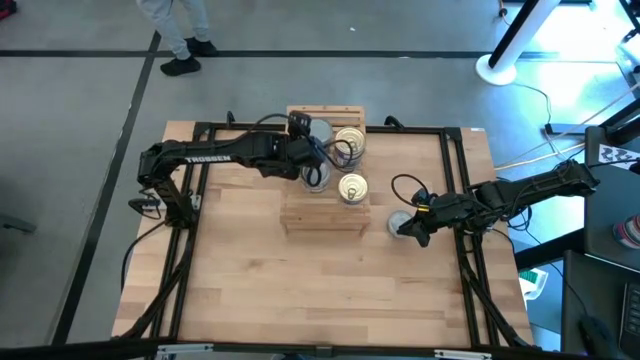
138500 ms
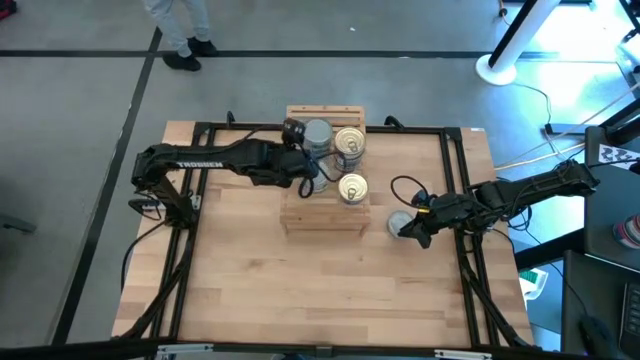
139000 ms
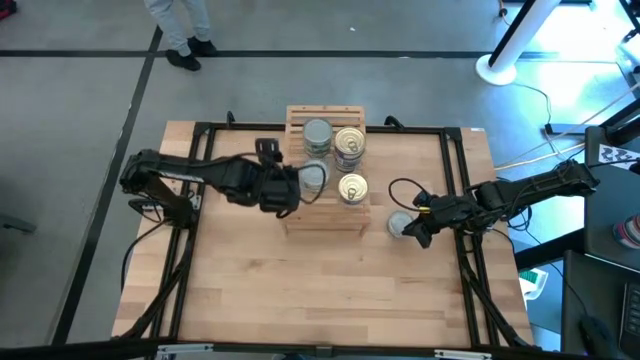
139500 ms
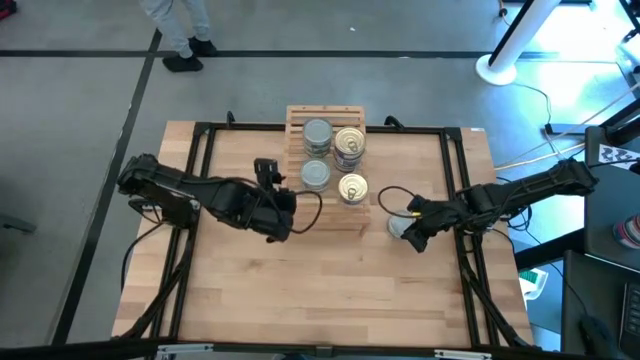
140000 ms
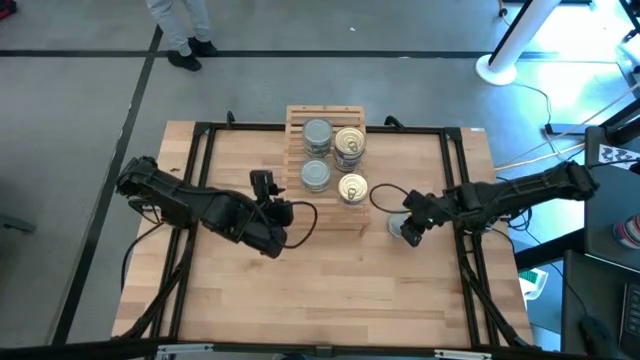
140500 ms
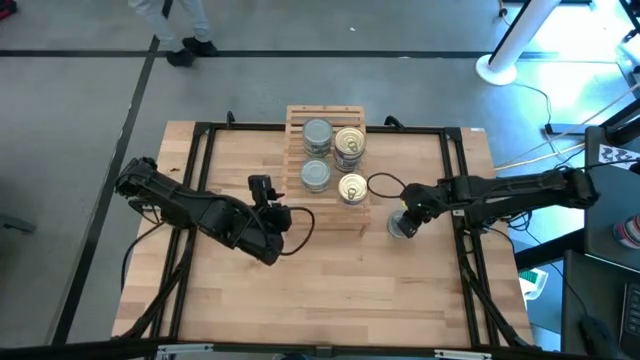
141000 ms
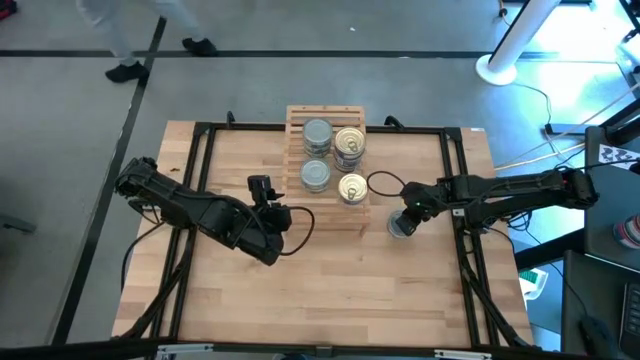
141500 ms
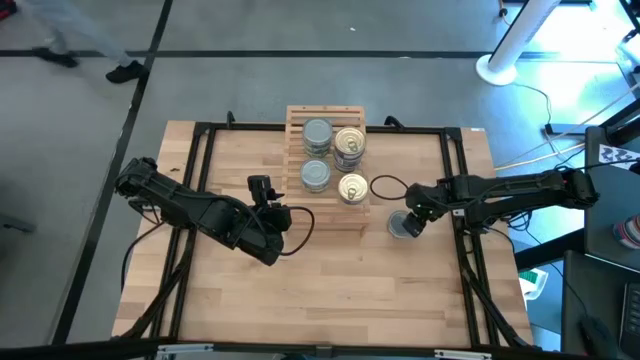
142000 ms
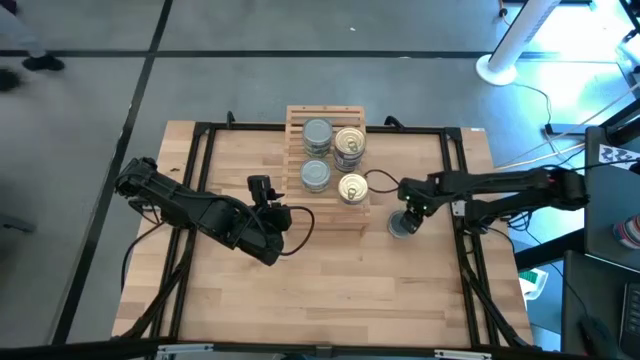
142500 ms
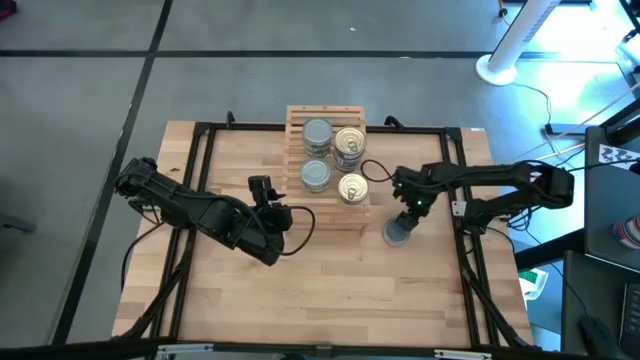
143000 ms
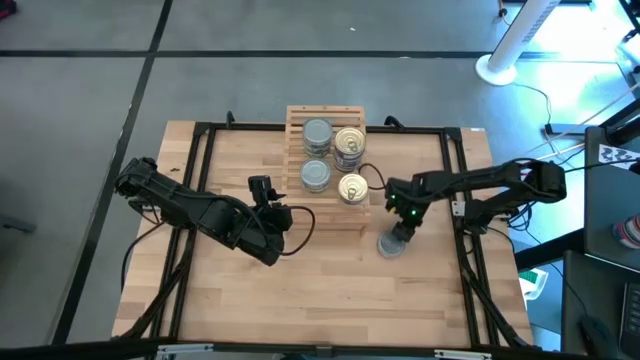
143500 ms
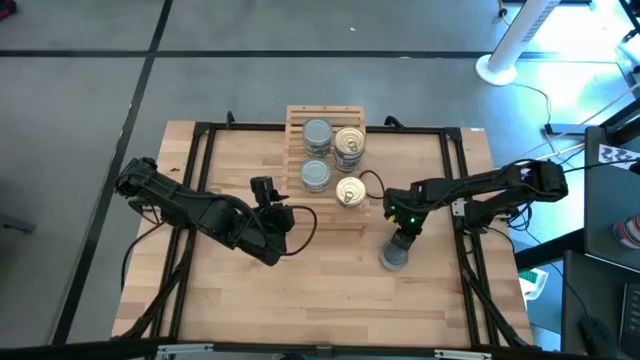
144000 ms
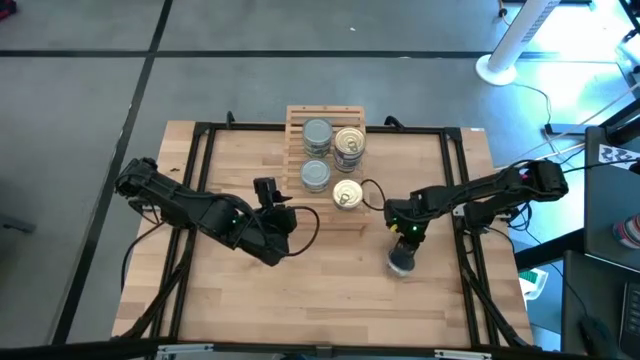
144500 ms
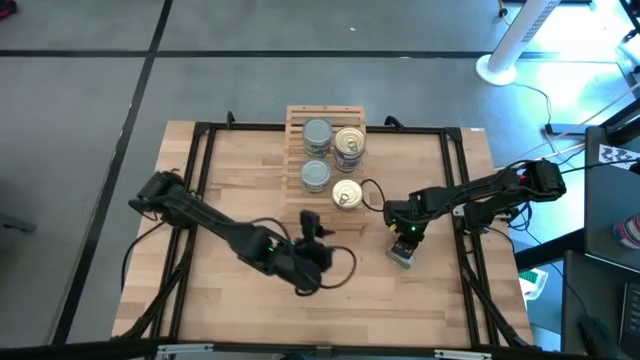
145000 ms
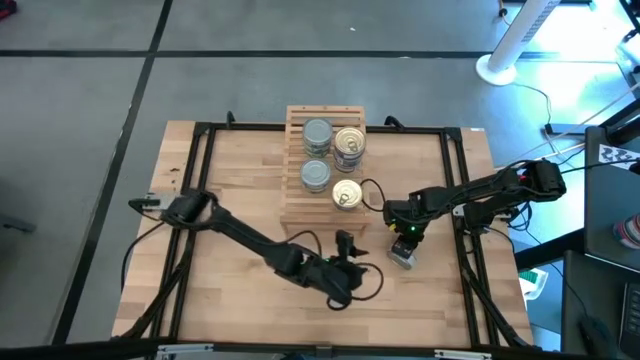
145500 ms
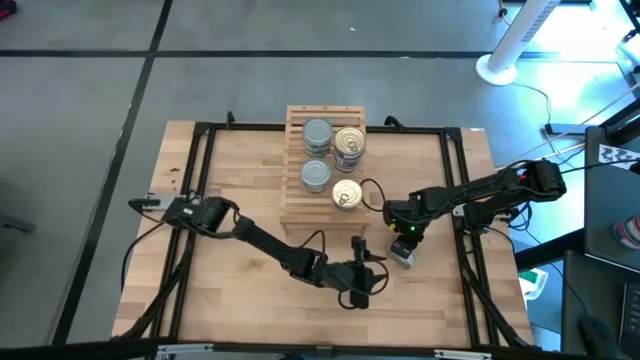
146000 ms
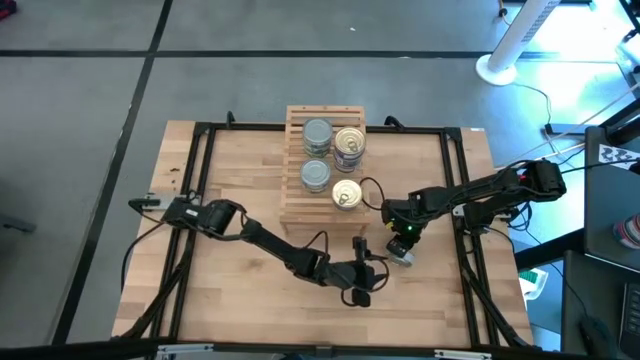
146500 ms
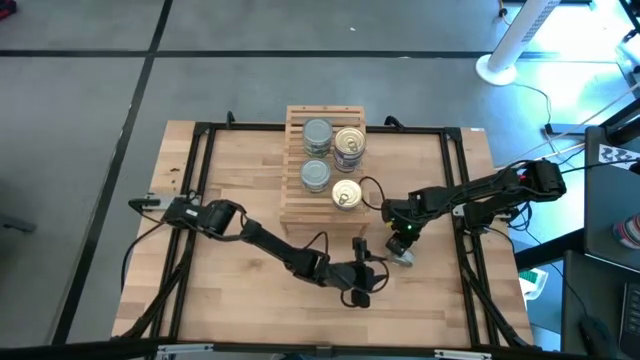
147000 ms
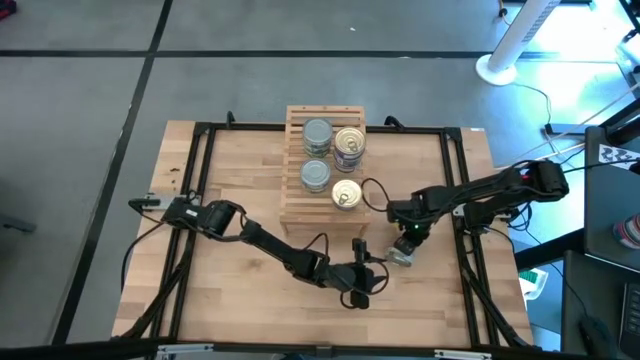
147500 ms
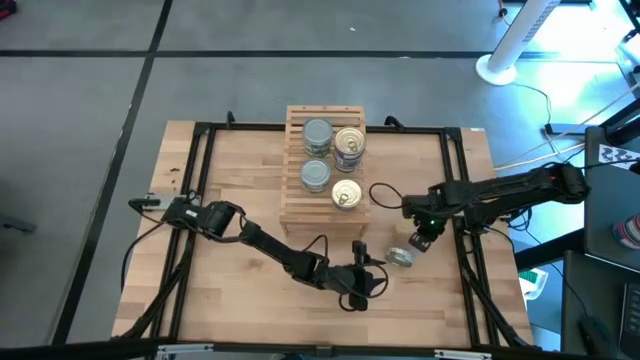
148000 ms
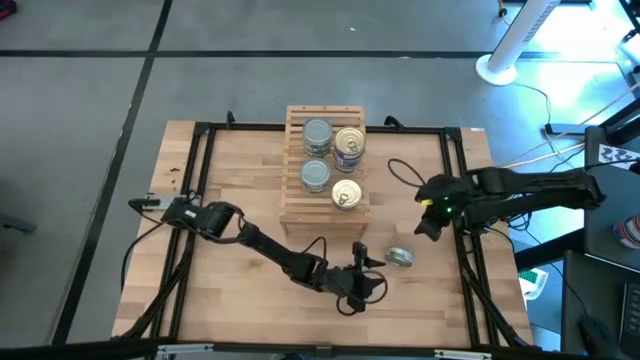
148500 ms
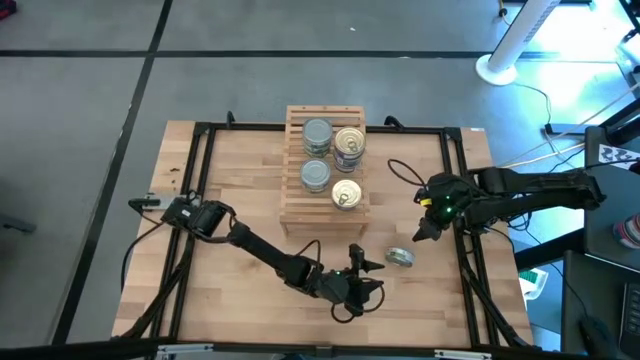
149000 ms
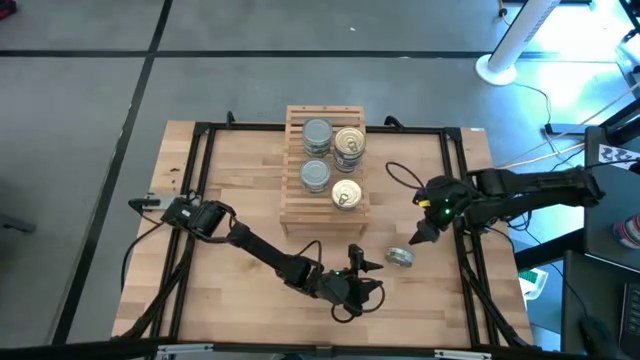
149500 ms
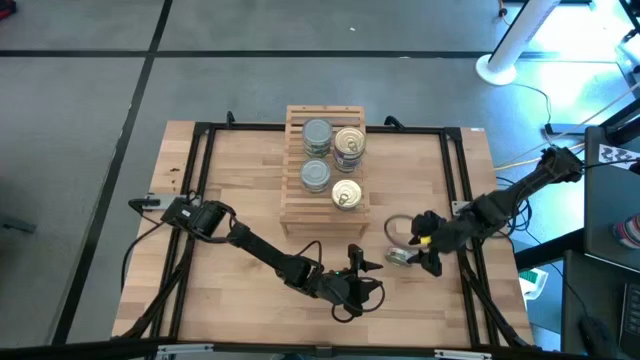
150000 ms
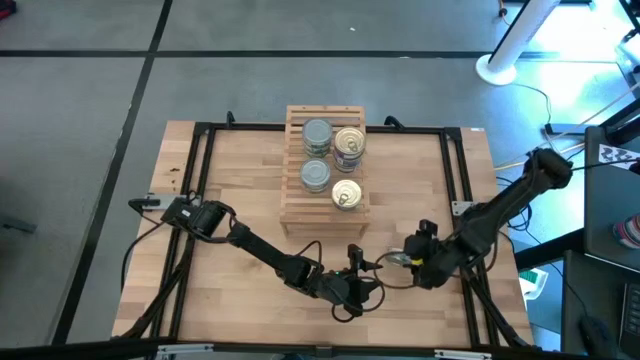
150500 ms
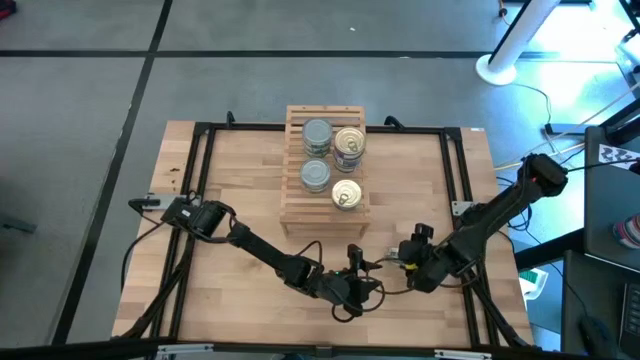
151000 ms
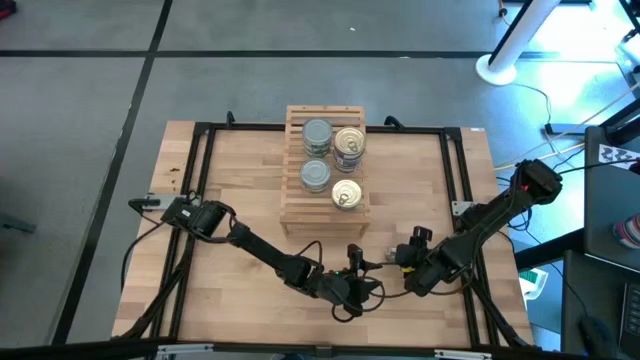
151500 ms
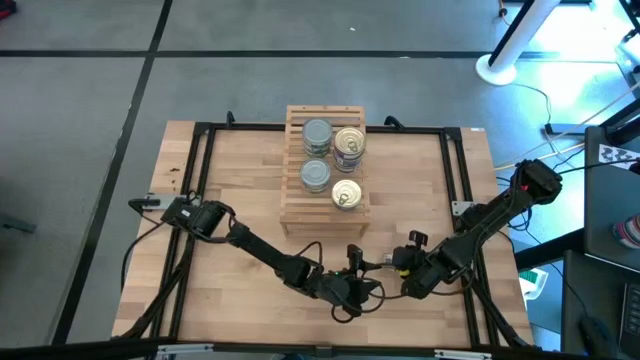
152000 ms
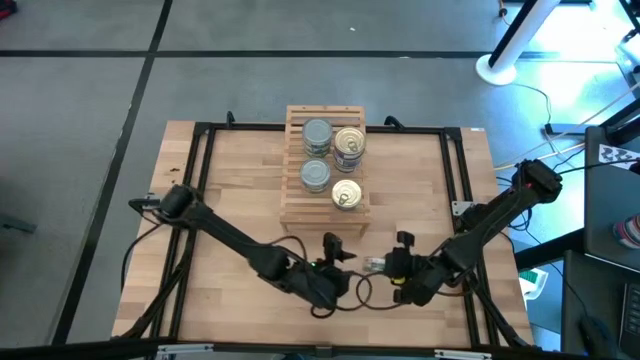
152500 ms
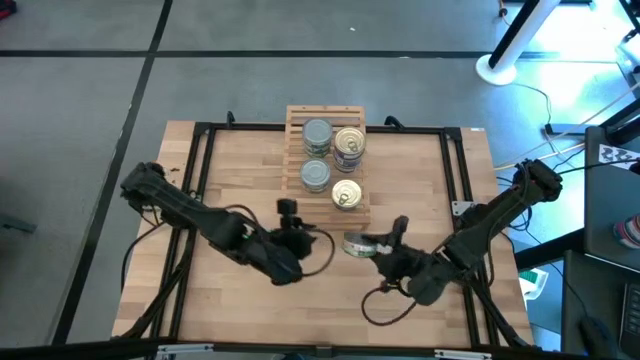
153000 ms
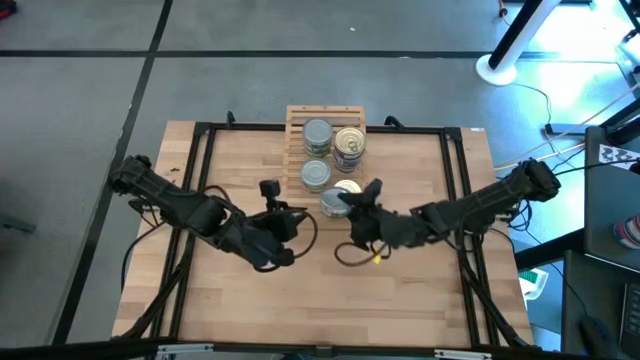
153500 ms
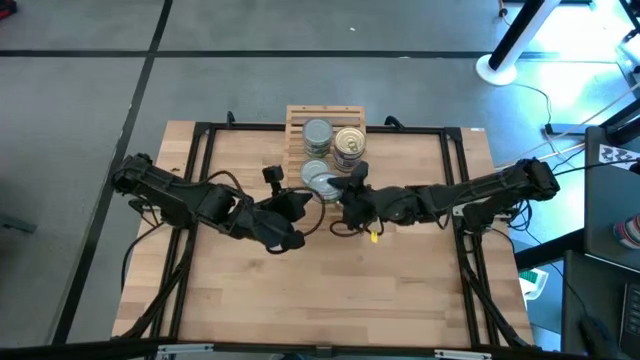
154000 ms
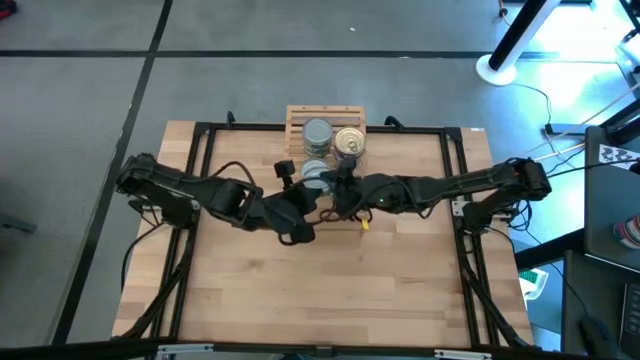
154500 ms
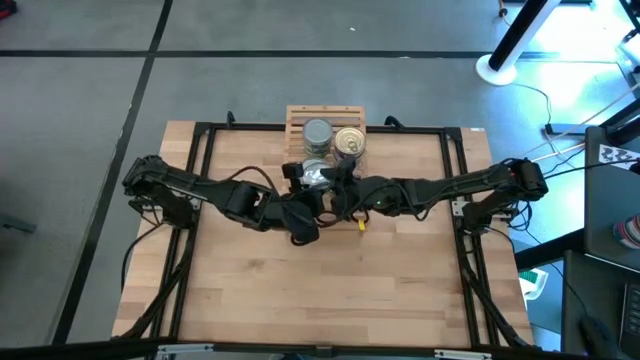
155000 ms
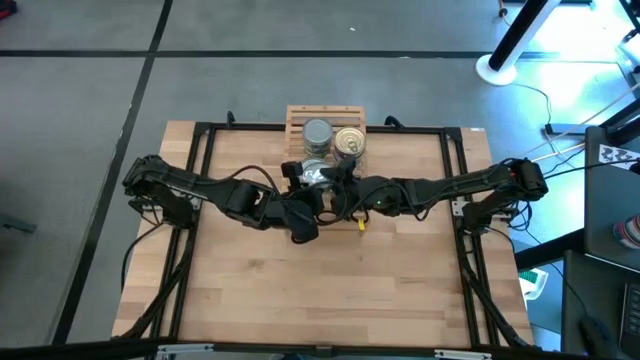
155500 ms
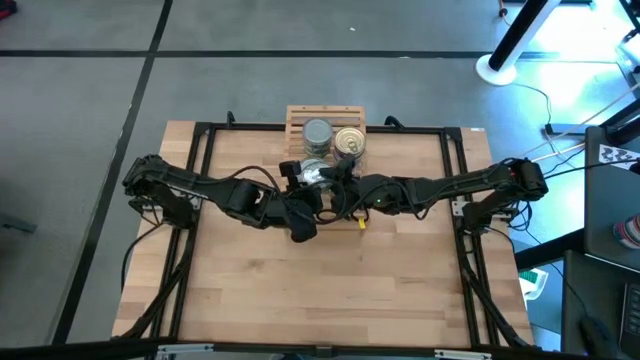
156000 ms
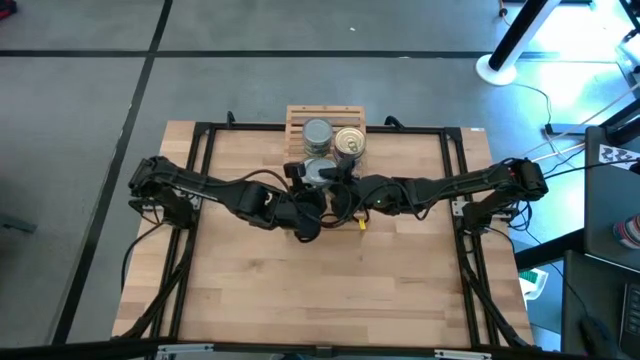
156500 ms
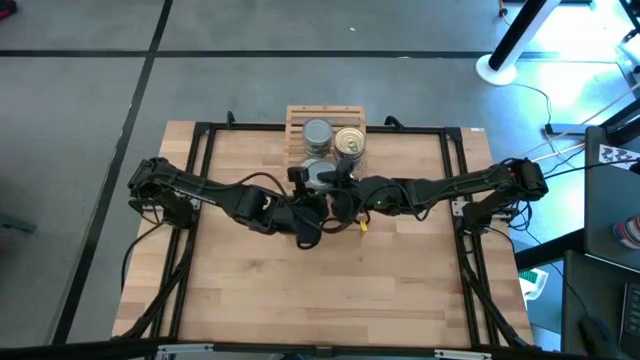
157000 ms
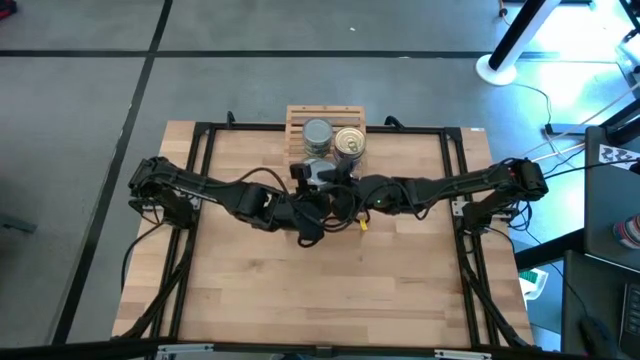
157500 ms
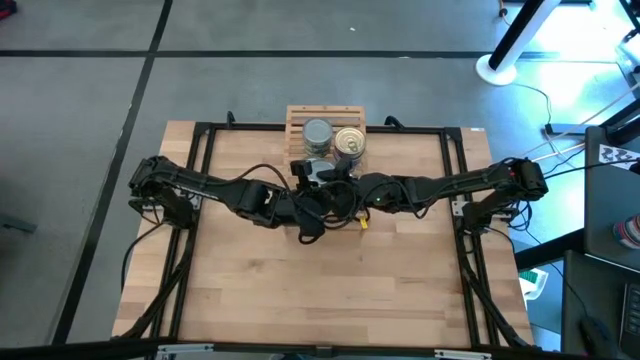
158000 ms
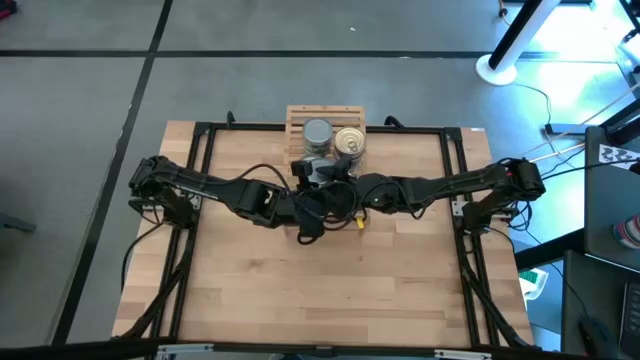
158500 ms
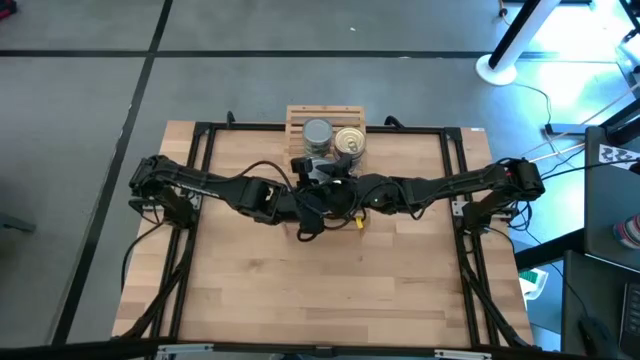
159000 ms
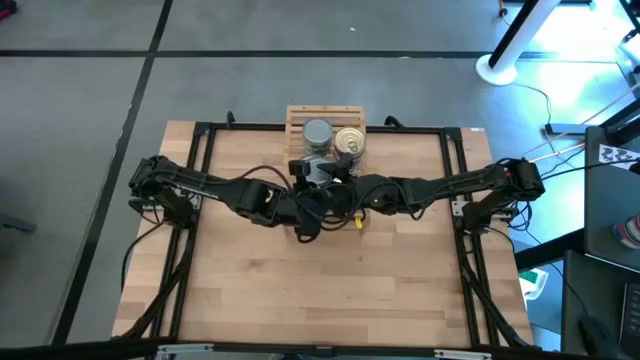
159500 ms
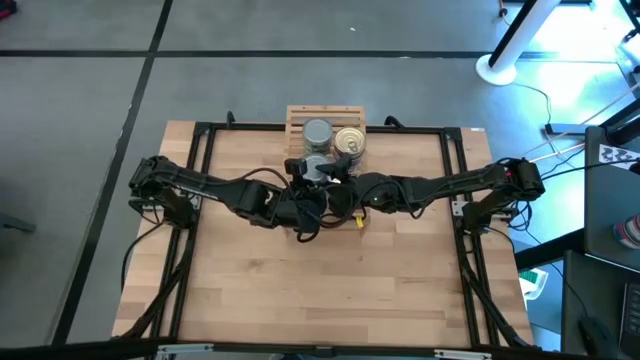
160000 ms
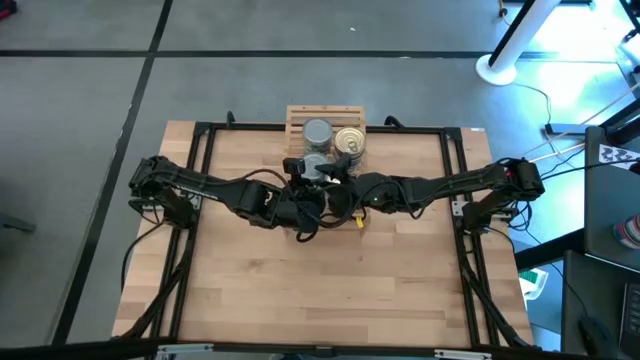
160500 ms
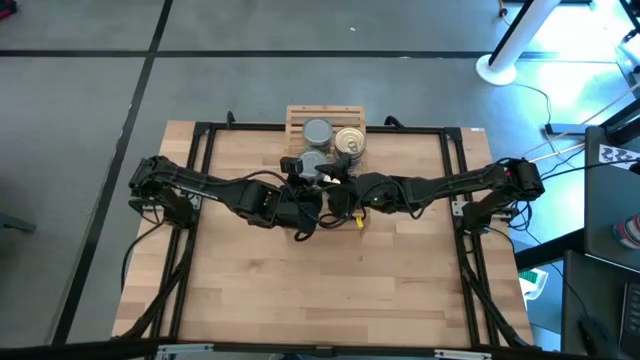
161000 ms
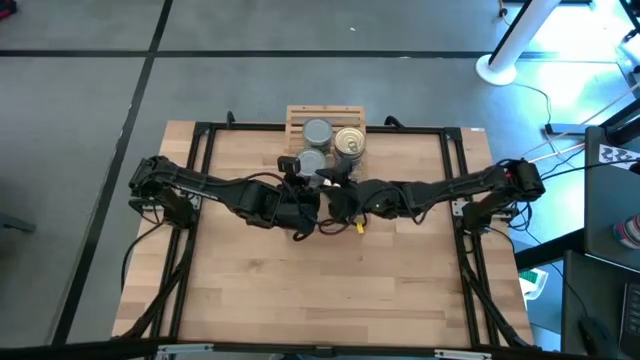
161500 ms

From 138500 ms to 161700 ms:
Task: Stack canned seafood by type on shelf
Stack the green tuna can on top of the green tuna can on the shelf
